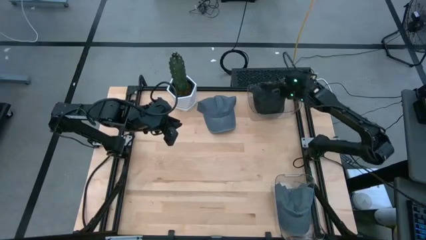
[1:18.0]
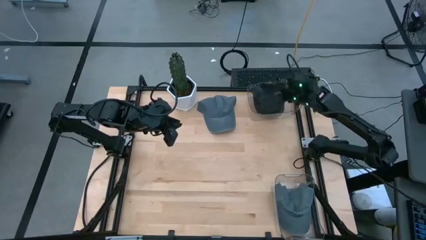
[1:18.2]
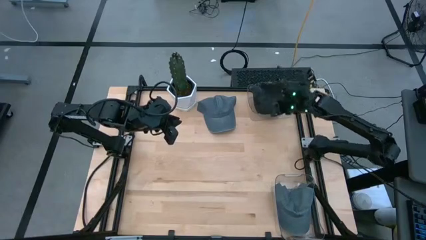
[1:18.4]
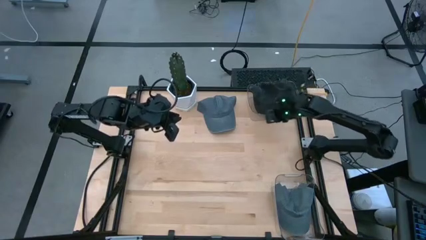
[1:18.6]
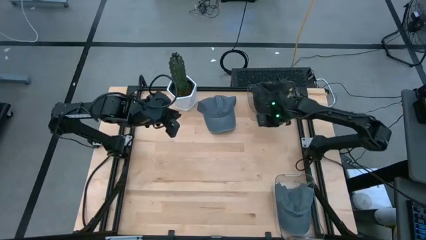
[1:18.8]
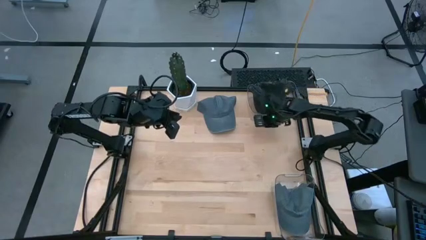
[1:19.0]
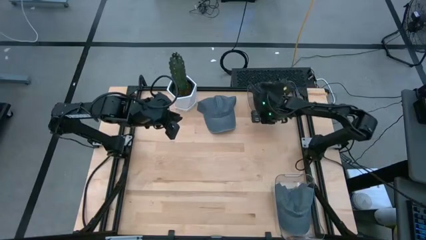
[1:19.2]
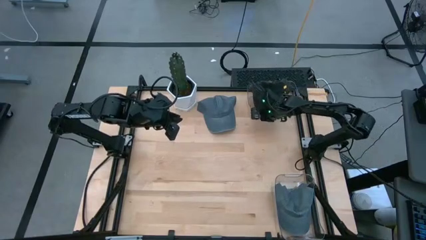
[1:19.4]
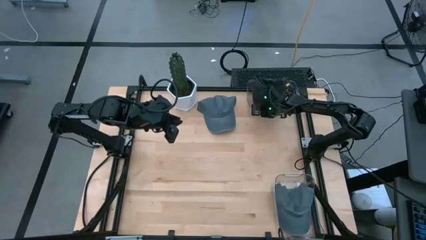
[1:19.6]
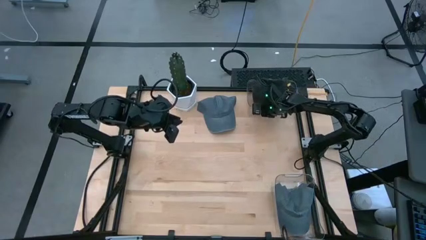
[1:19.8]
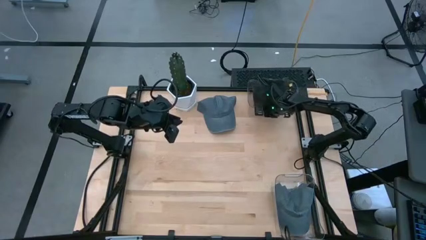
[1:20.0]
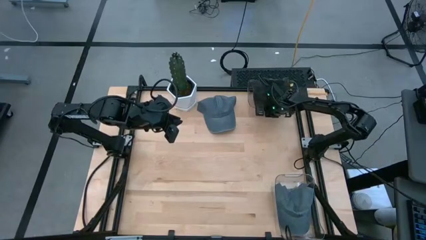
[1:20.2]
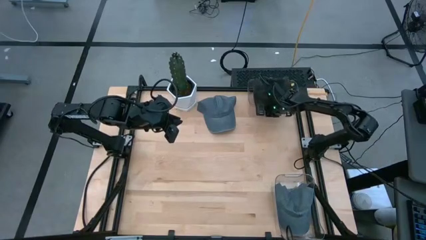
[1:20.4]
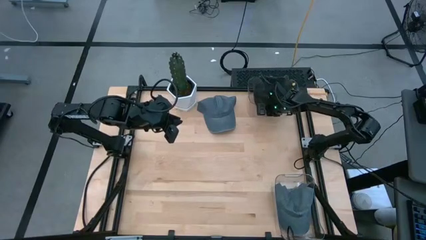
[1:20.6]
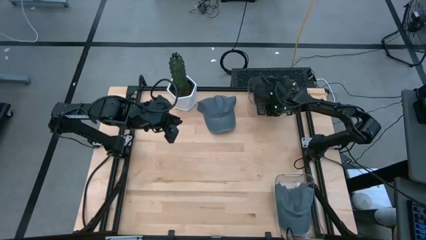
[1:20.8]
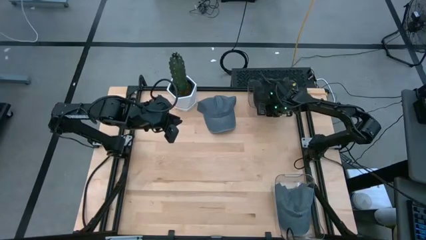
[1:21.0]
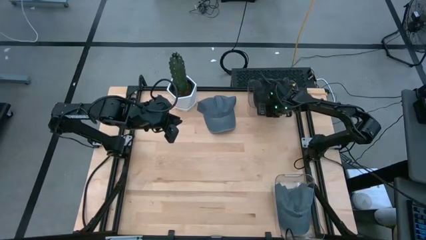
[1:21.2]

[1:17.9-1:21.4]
Task: Pick & Place hat
Adjust the top transparent bin on the table

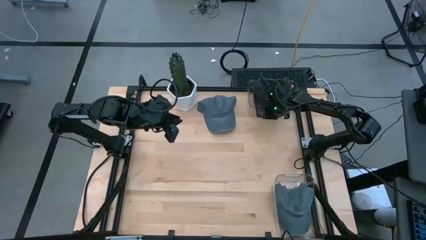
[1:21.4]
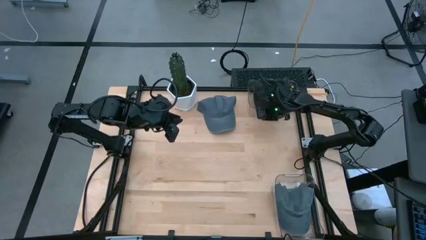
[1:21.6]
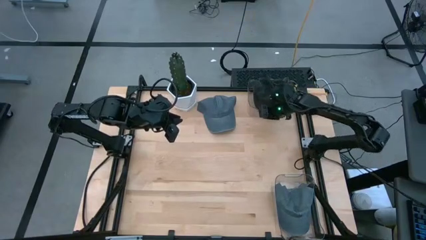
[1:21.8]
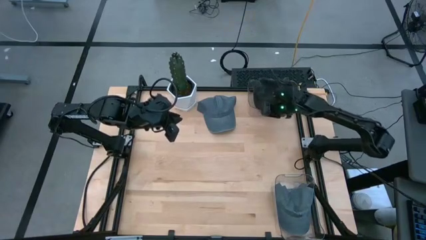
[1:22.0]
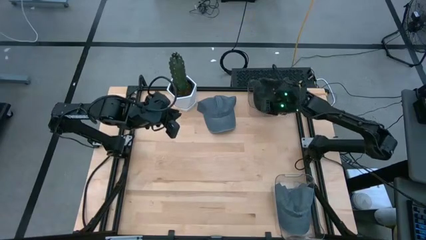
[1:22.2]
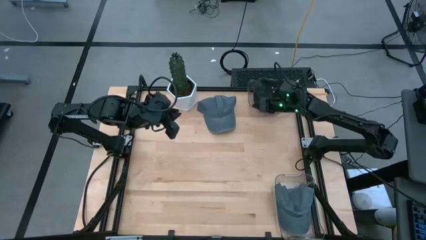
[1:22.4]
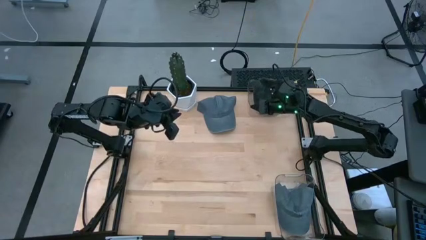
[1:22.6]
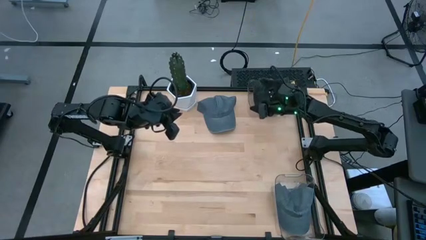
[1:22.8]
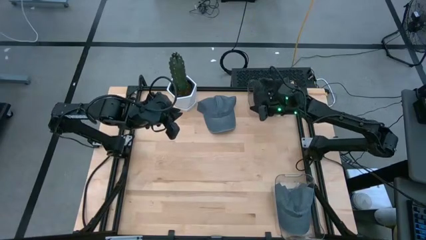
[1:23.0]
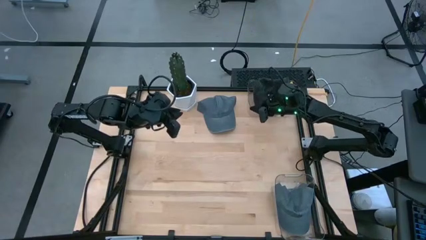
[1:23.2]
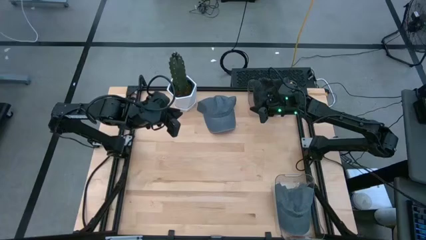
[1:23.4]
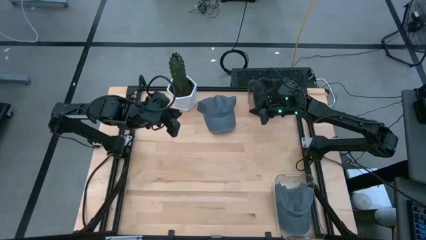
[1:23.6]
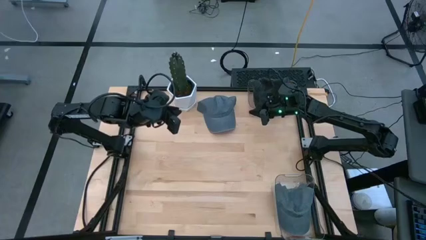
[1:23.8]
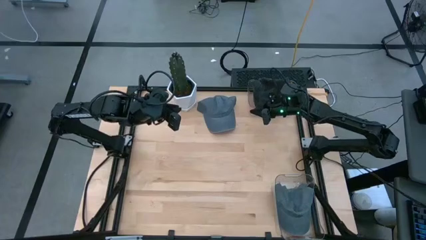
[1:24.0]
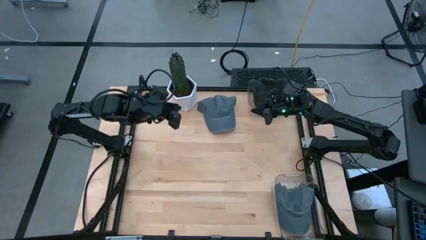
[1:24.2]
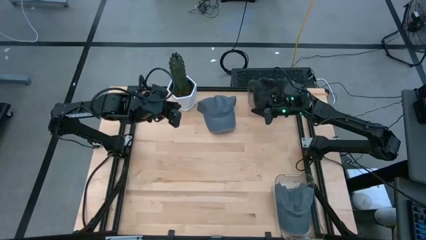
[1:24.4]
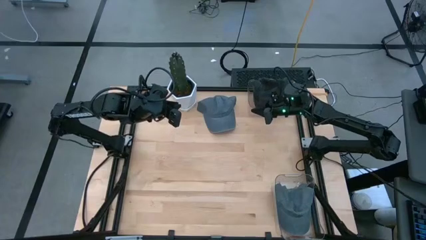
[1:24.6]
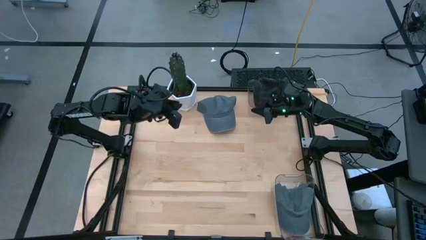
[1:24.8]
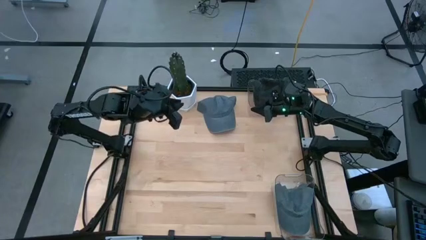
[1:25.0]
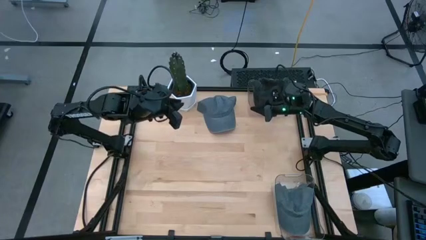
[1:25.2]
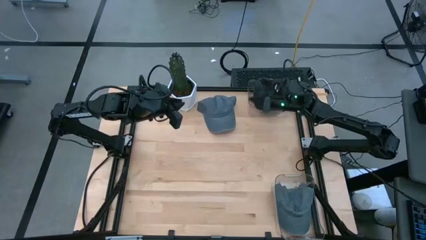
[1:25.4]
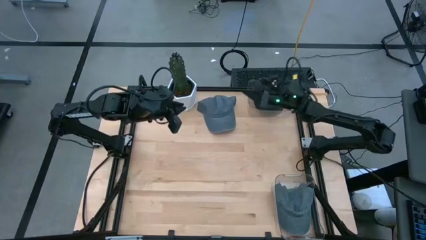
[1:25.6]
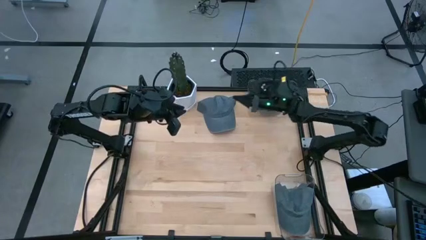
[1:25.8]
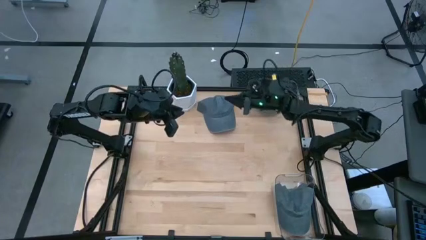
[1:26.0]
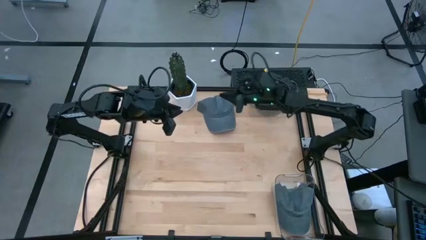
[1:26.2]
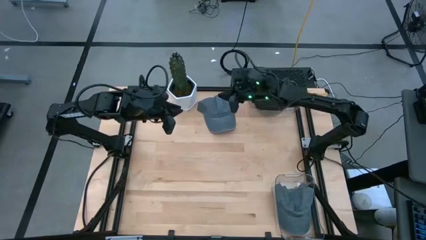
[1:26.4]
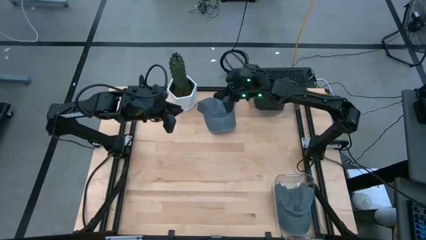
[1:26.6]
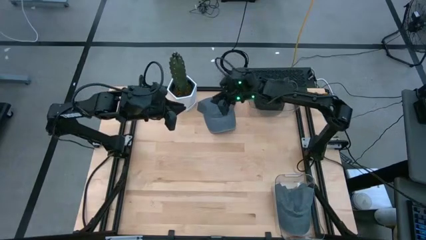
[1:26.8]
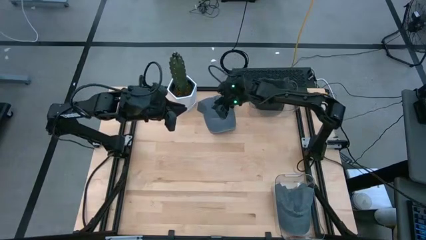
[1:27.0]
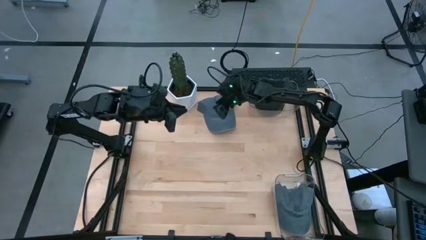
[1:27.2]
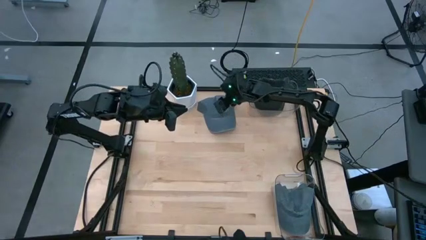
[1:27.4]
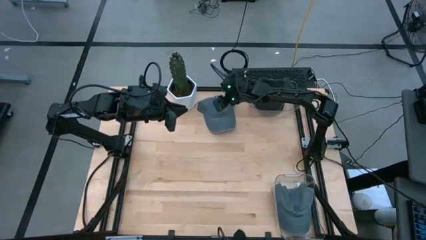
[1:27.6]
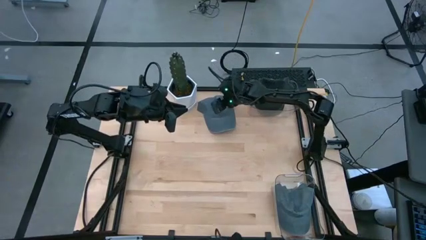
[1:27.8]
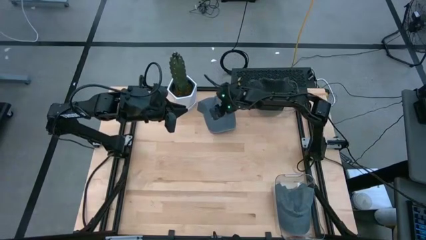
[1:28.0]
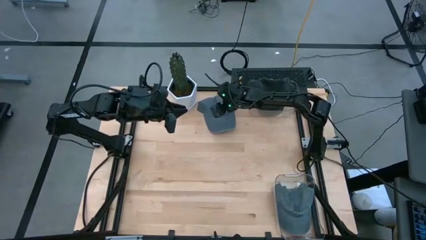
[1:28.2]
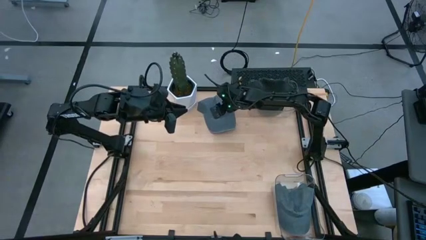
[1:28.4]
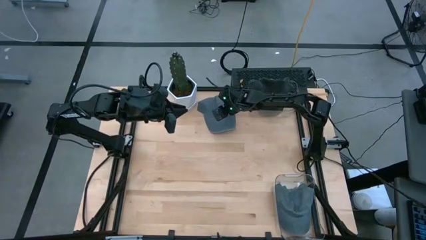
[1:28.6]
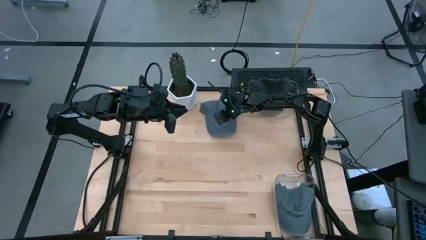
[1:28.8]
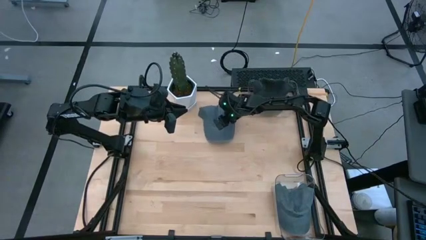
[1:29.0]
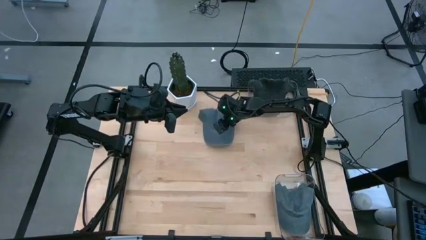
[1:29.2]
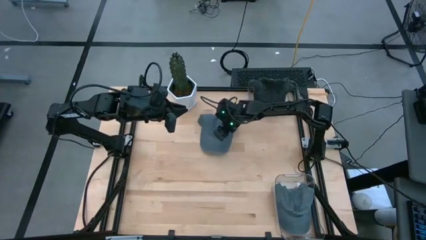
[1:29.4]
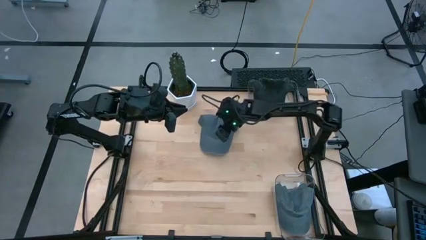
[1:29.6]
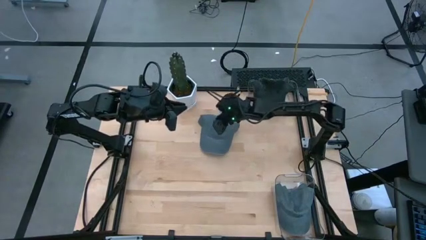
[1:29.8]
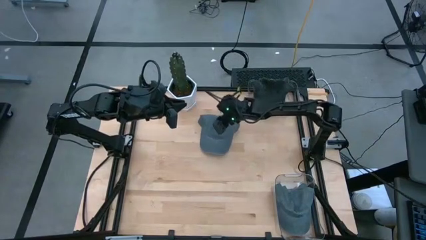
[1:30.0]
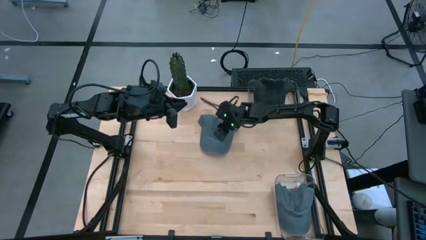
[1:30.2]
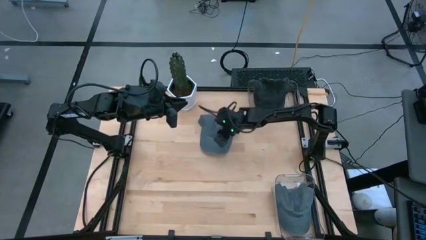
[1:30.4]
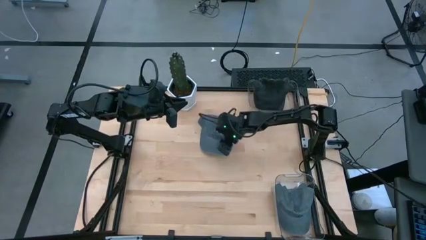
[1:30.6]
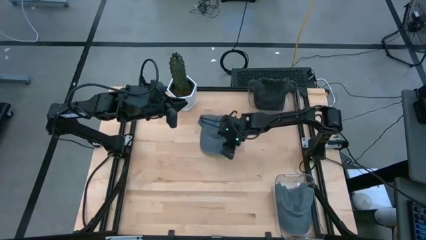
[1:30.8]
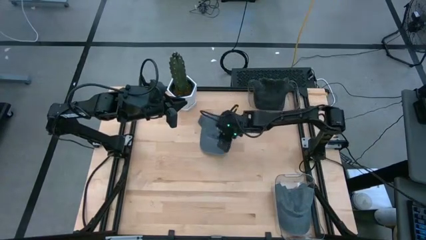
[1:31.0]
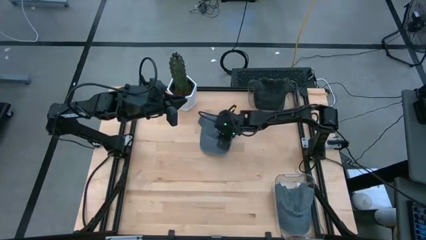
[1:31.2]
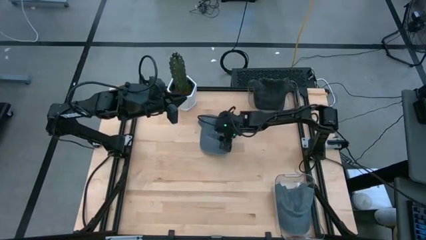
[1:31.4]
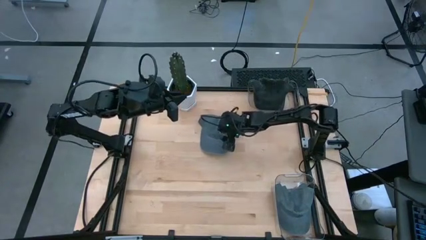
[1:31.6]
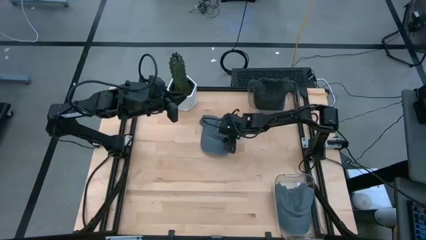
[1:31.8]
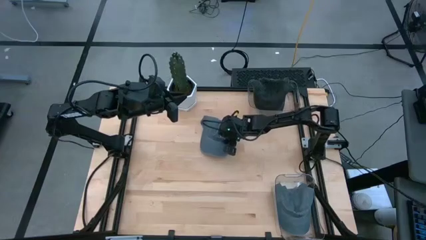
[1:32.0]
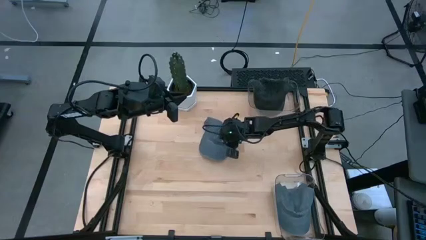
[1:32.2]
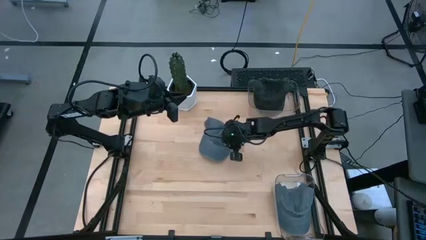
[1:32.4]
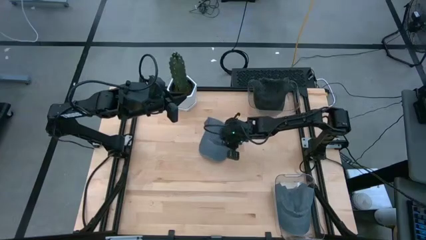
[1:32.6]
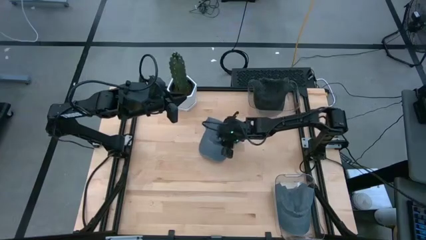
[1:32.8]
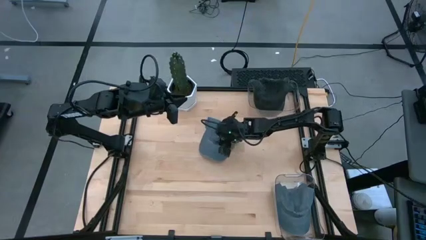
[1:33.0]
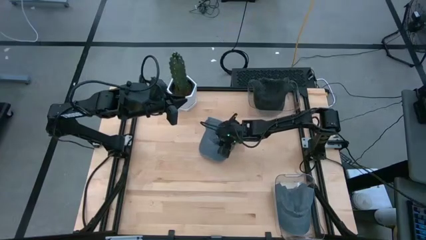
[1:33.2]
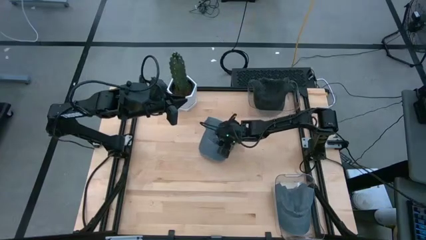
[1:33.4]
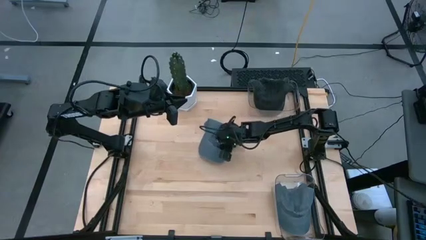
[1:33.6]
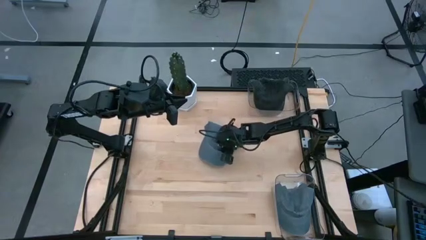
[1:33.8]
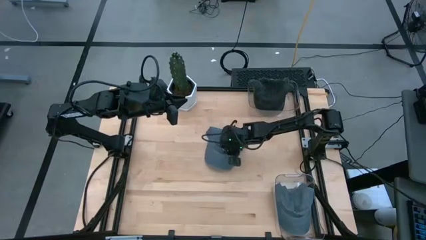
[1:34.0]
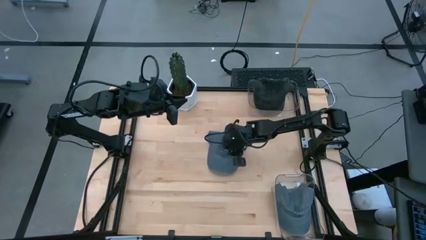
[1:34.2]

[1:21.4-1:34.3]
Put the gray cap into the bottom transparent bin
